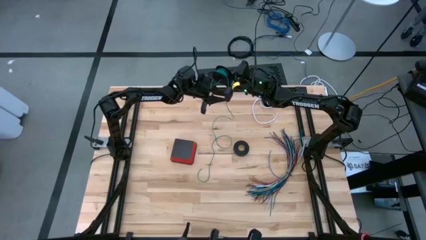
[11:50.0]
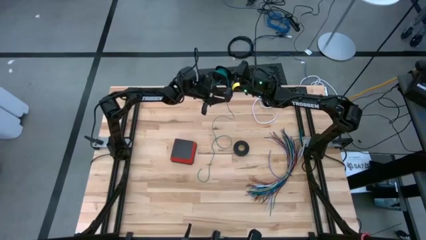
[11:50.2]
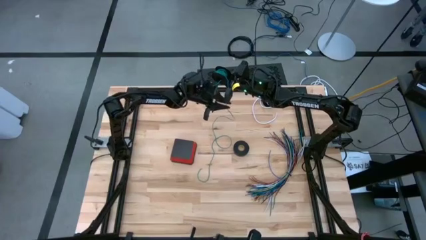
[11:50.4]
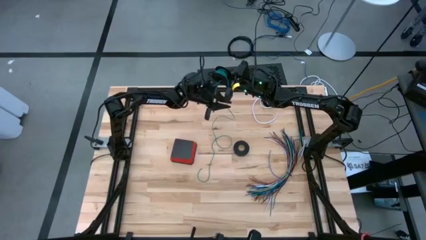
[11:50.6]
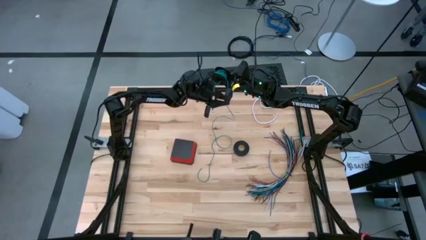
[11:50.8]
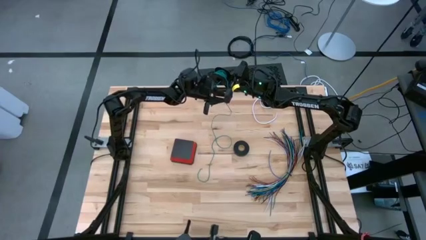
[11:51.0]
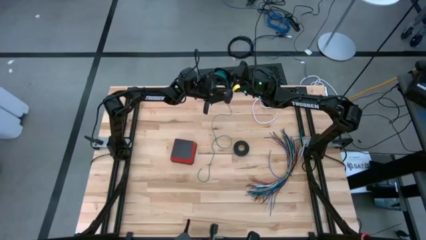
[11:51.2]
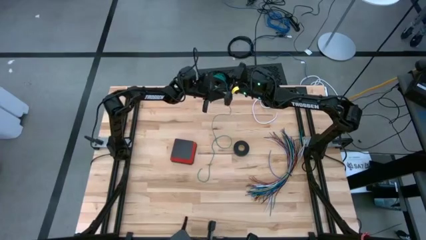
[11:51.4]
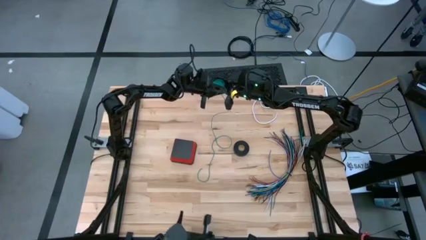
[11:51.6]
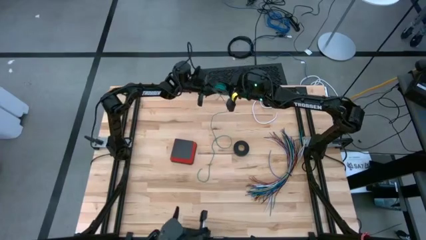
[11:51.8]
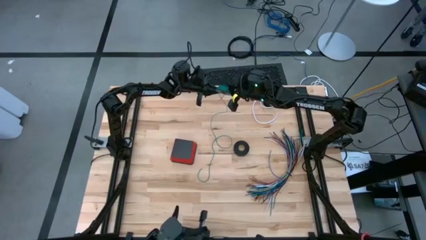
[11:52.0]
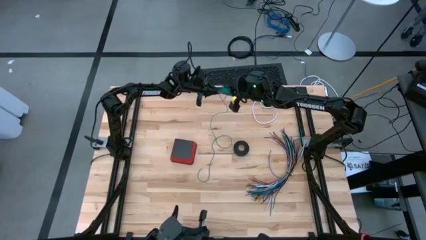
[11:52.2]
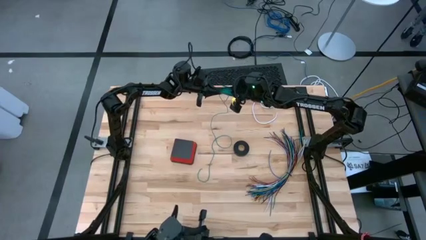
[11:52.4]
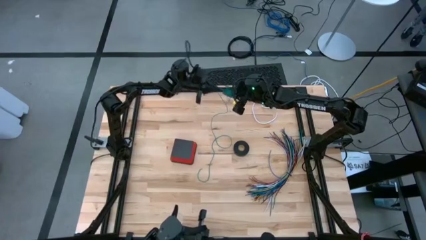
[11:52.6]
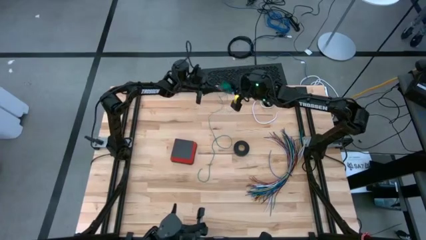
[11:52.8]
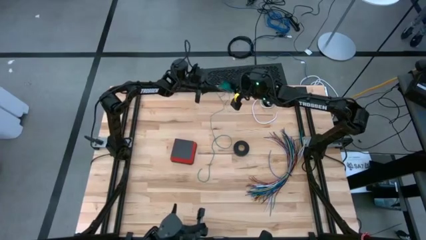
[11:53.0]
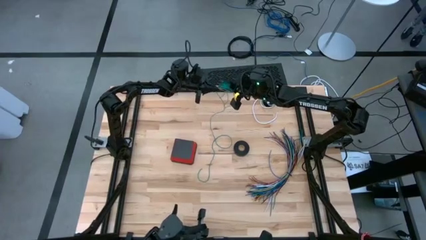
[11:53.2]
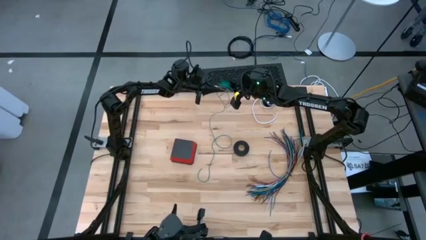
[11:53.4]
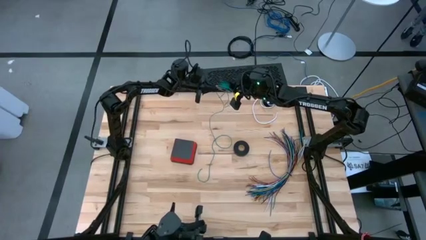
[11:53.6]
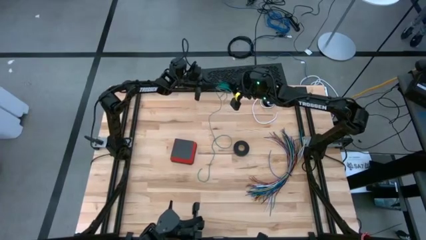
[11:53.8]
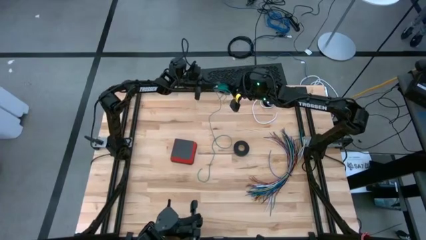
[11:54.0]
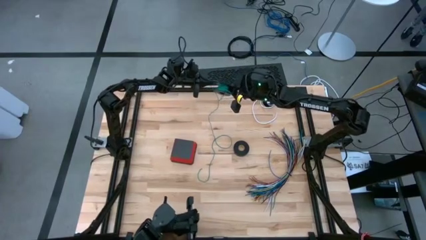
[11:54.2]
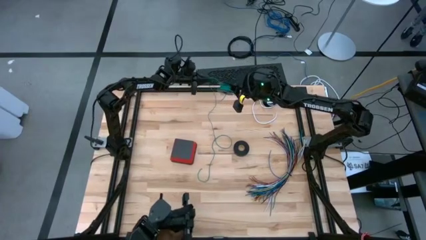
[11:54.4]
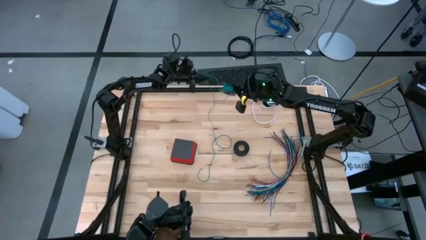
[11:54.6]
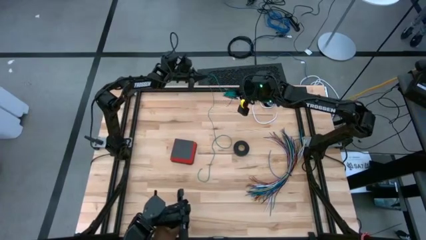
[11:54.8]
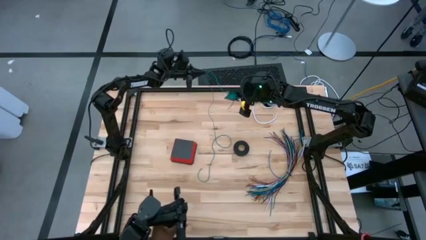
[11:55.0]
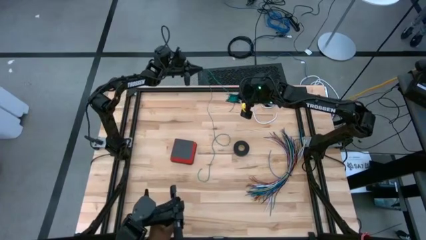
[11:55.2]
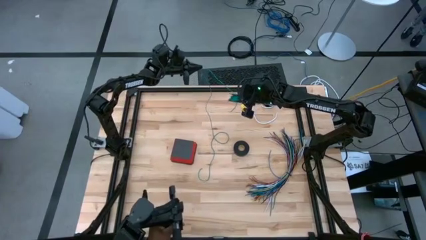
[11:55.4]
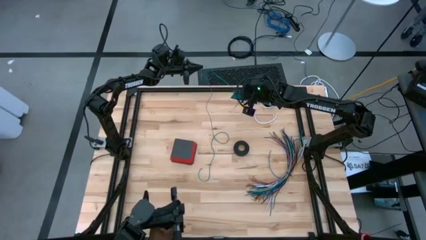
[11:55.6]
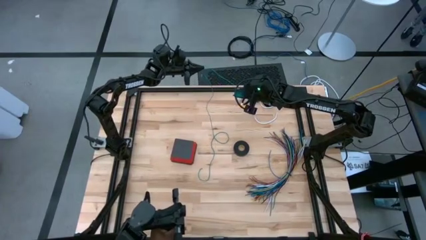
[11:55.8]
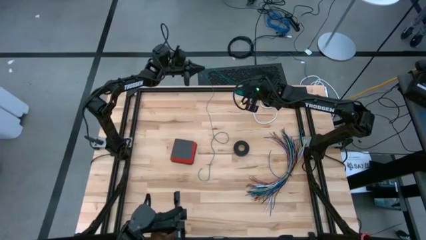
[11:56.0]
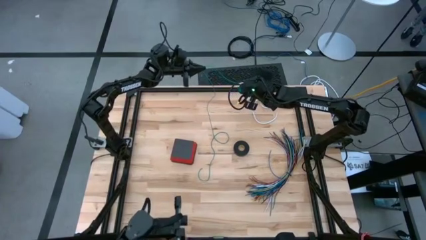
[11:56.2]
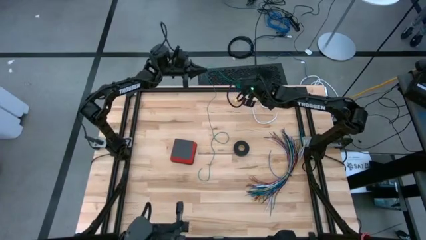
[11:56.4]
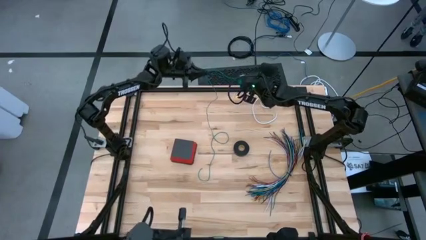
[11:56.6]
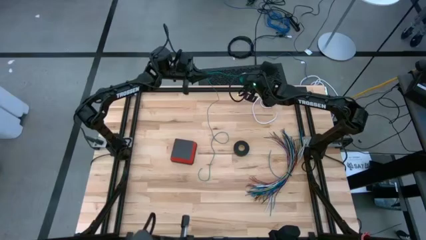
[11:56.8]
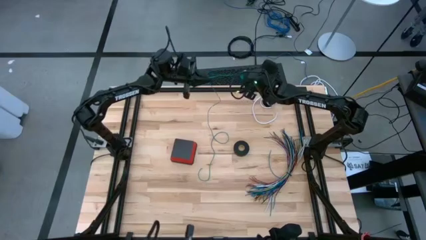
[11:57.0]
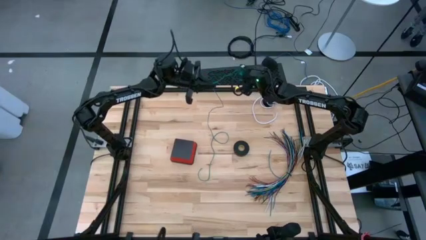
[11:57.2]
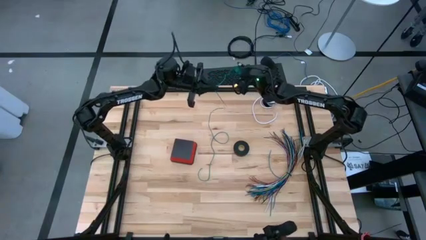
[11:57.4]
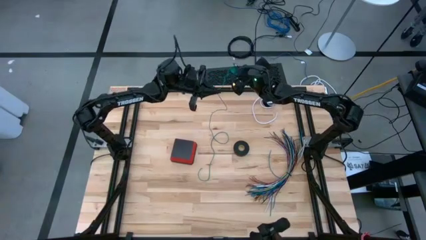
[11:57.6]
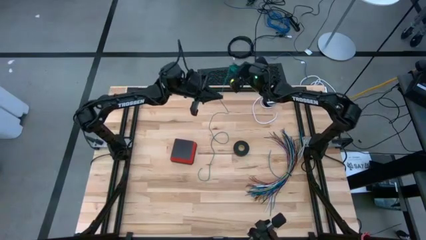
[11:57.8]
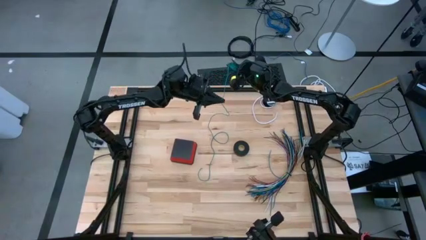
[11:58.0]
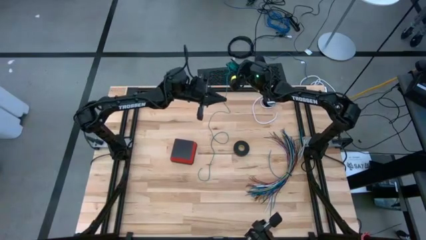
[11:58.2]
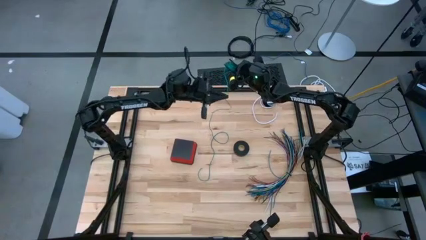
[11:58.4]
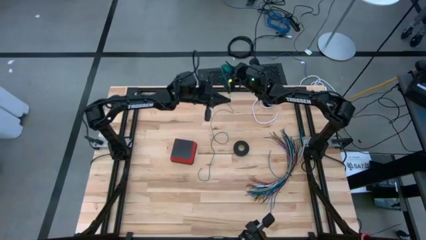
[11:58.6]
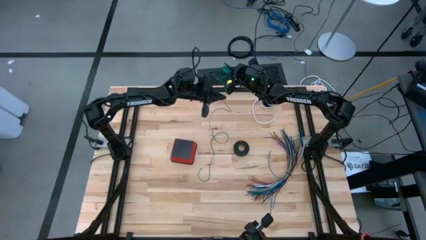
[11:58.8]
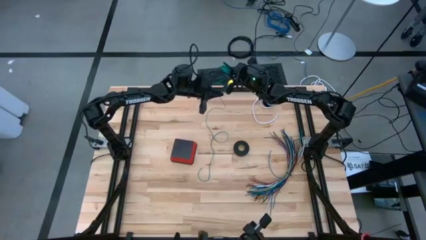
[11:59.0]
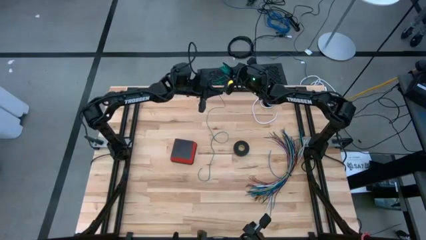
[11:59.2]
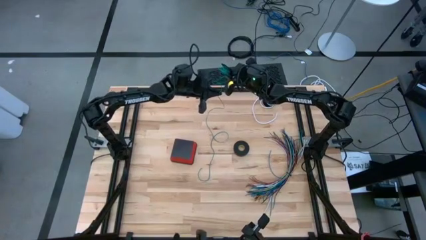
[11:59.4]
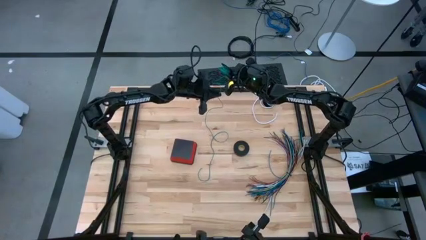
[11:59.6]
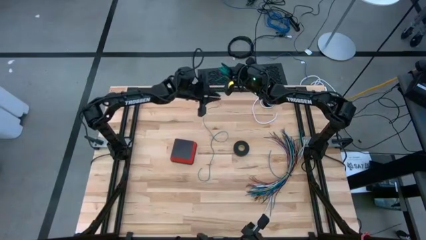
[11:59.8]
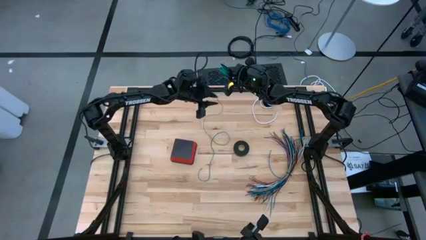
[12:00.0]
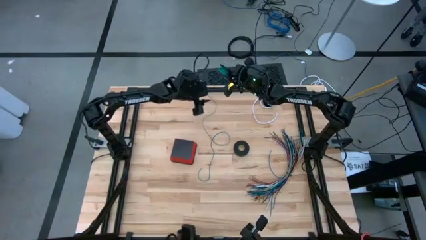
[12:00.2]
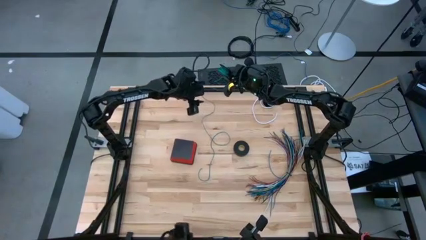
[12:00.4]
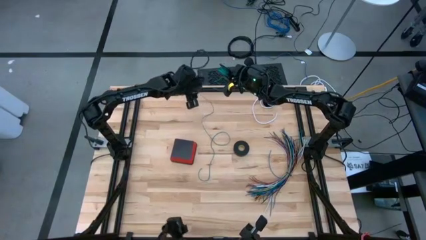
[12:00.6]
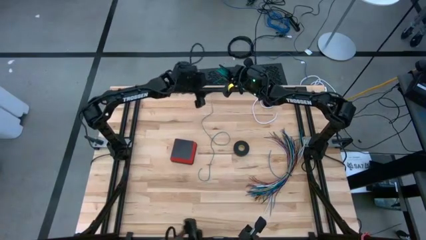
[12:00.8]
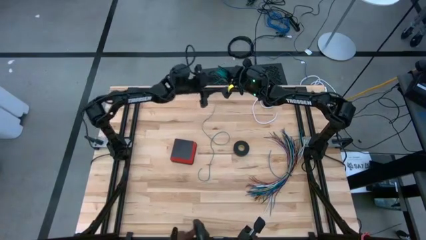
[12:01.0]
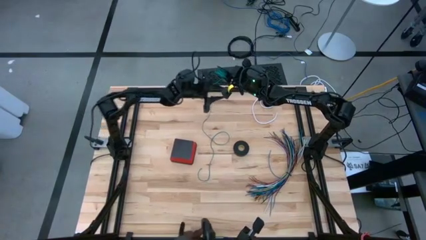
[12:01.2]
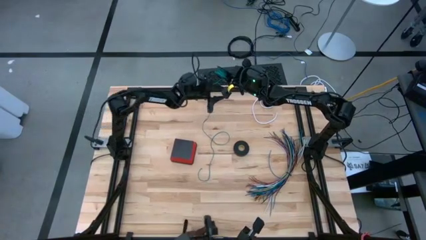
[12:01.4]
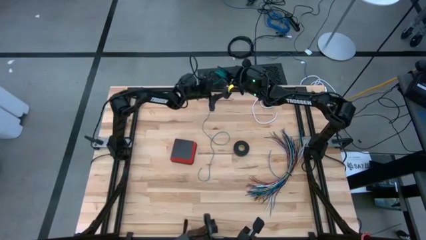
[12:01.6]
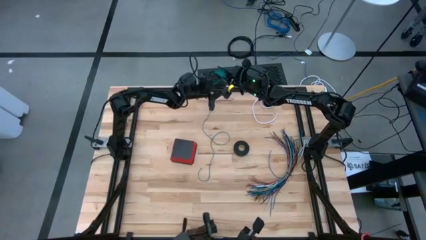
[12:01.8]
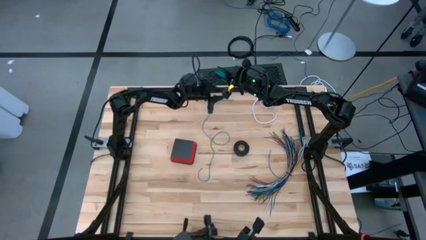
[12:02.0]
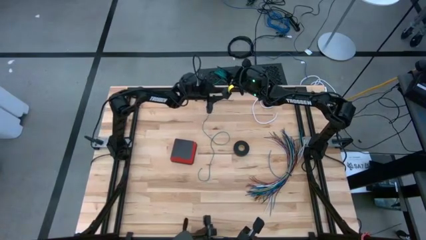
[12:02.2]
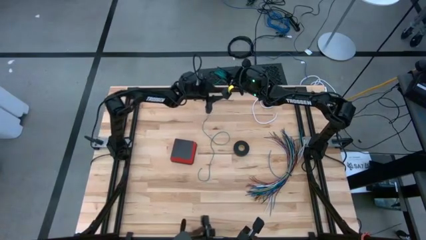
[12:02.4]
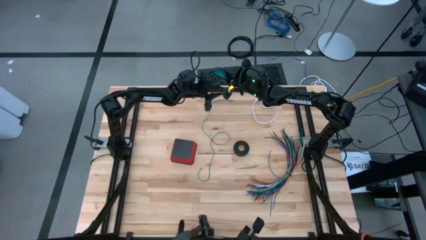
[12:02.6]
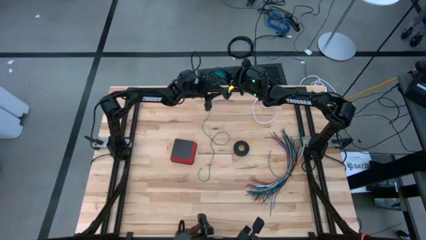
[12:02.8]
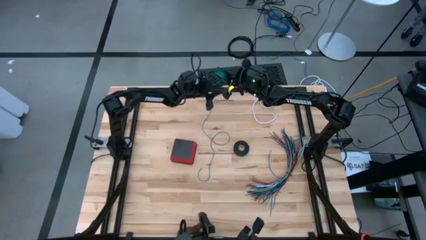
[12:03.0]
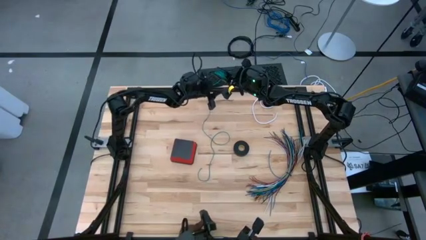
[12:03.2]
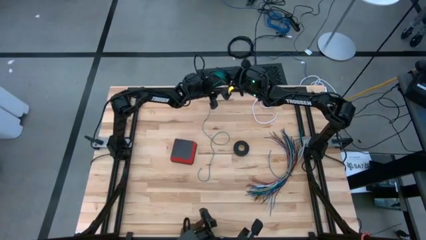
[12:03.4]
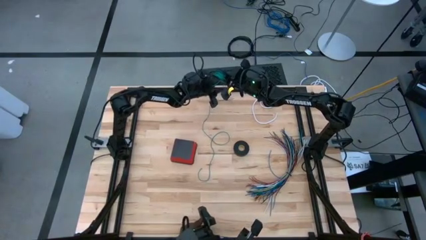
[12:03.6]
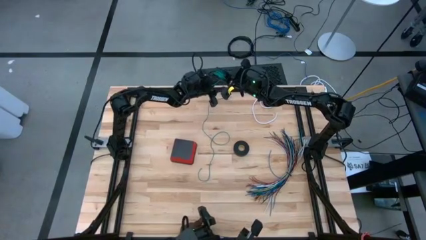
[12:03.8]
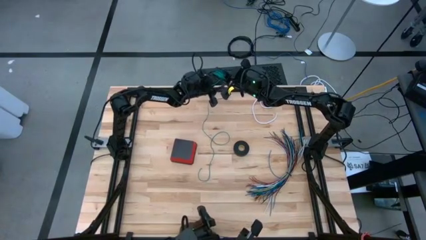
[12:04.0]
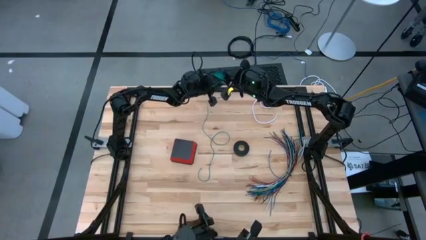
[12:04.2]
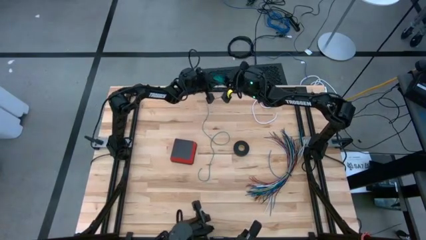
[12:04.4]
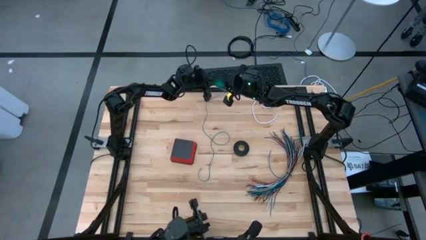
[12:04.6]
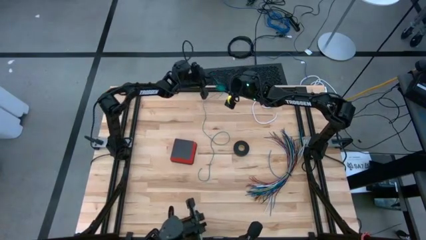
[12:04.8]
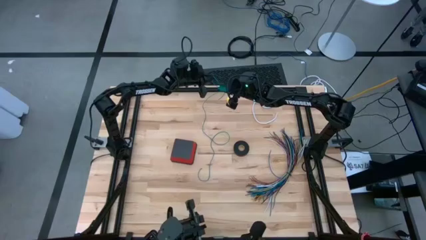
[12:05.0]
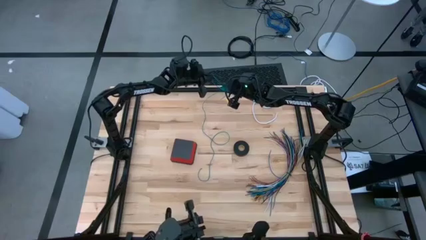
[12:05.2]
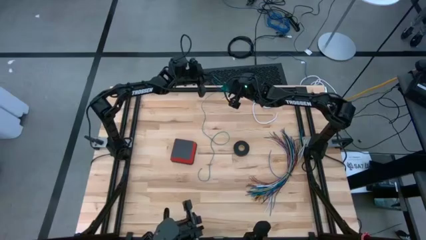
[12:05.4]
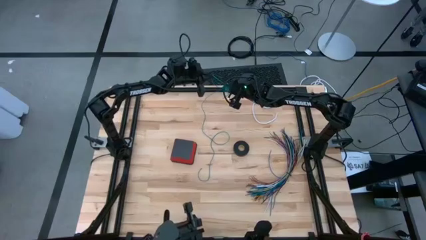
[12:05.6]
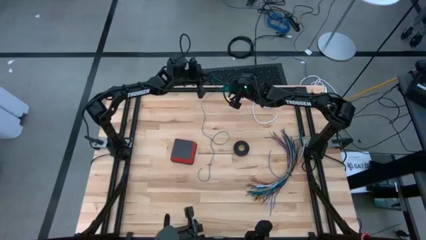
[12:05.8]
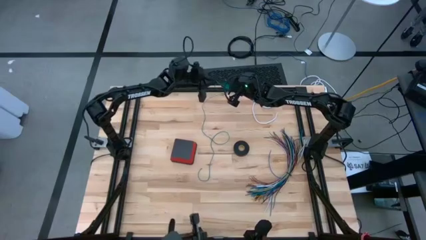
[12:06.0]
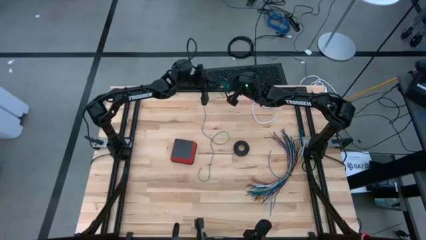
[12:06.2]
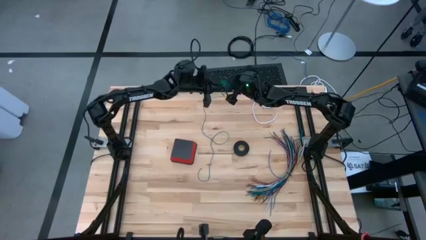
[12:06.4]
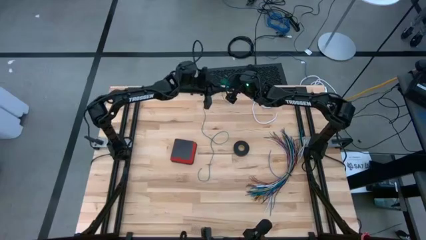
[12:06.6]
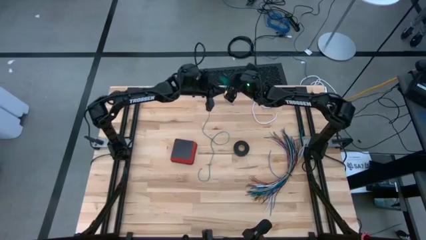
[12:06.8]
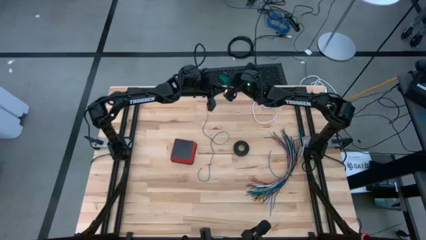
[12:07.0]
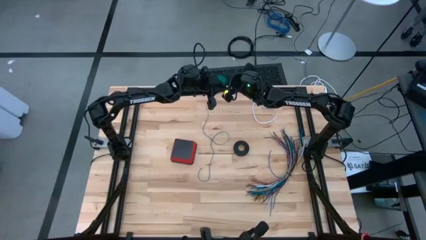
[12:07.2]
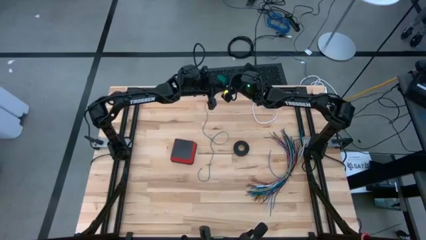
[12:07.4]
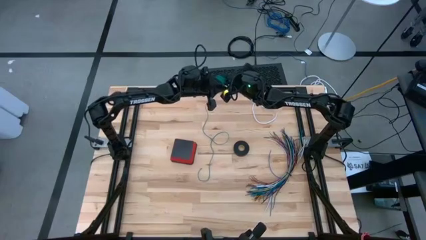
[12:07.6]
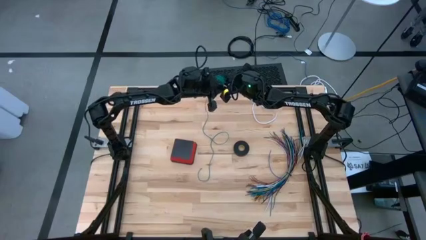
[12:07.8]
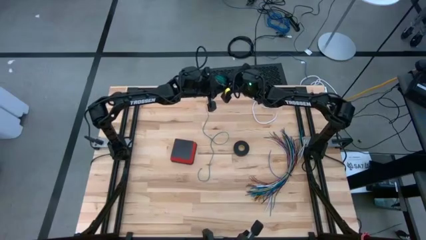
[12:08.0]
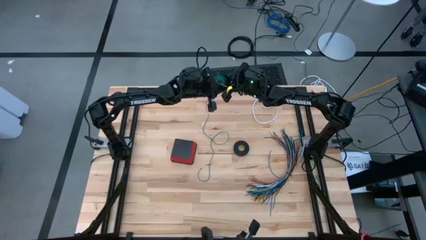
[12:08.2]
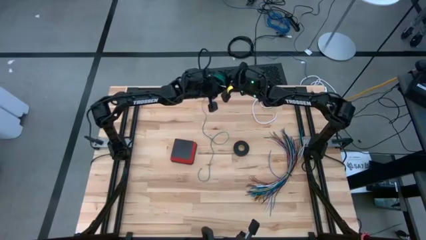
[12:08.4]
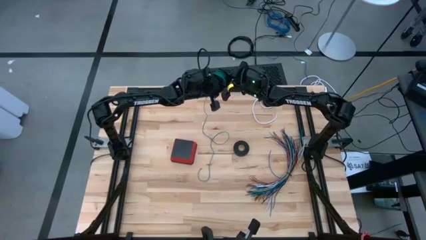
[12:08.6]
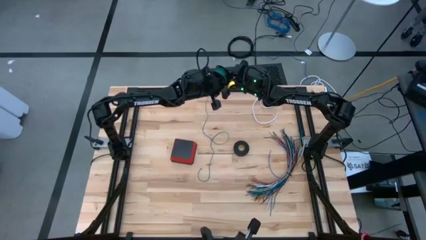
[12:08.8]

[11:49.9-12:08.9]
Task: Coiling cords
Coil the green wire cable on the spool
